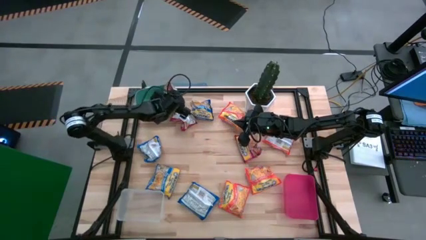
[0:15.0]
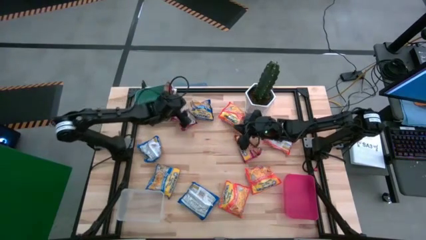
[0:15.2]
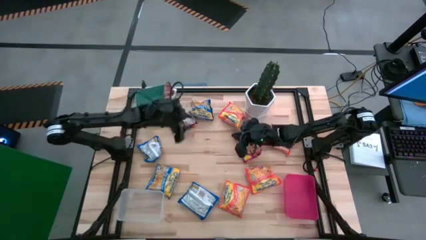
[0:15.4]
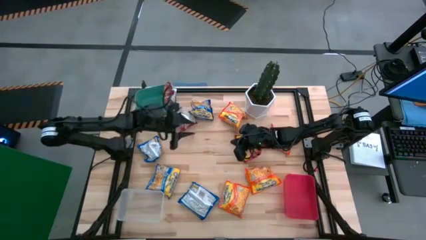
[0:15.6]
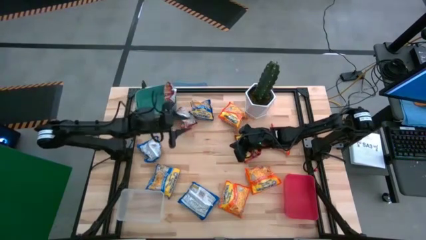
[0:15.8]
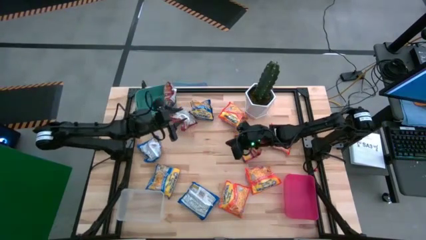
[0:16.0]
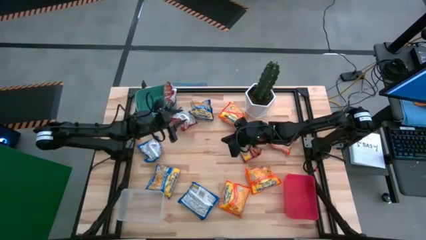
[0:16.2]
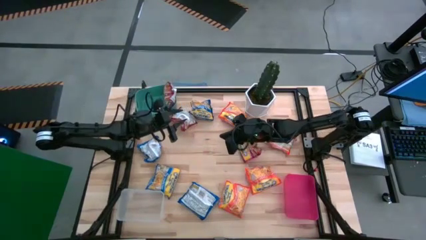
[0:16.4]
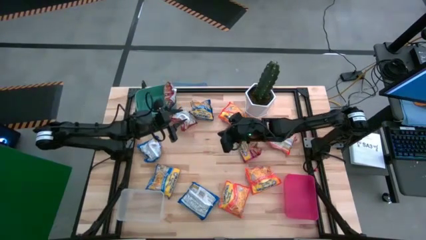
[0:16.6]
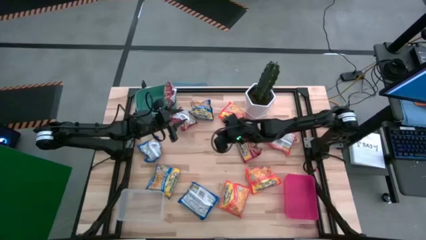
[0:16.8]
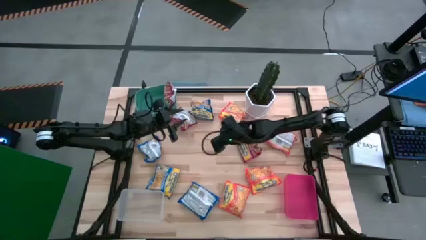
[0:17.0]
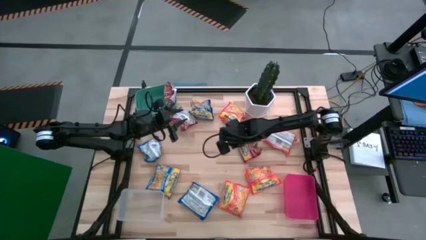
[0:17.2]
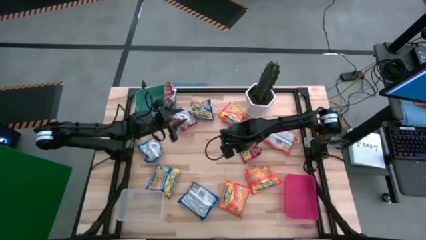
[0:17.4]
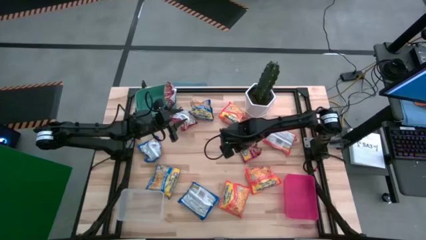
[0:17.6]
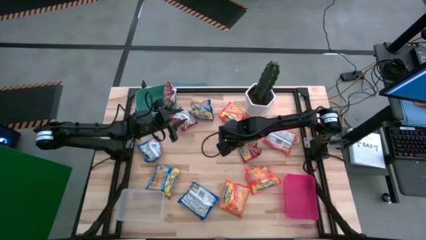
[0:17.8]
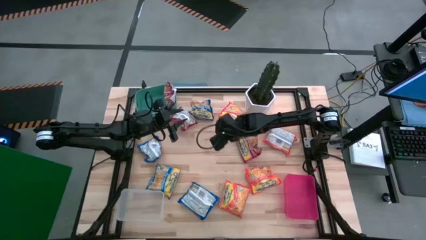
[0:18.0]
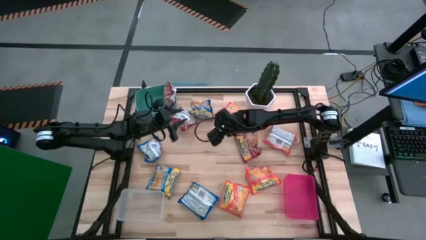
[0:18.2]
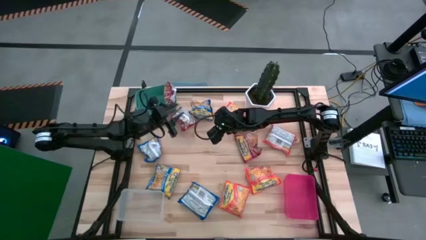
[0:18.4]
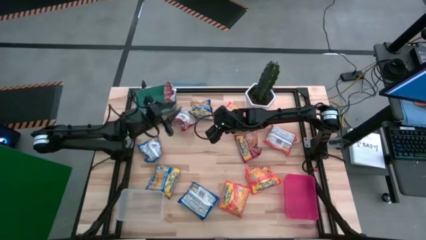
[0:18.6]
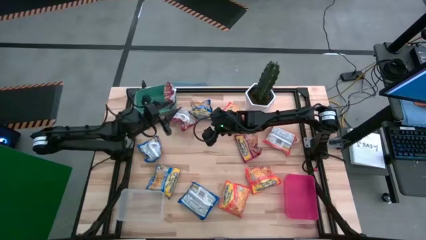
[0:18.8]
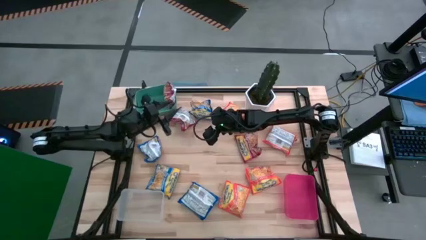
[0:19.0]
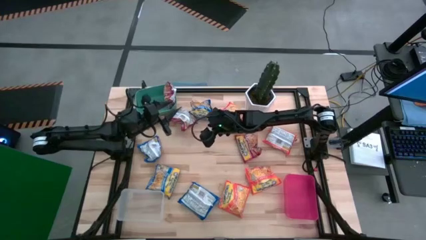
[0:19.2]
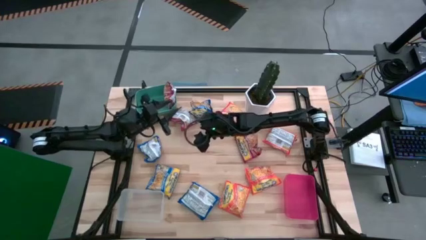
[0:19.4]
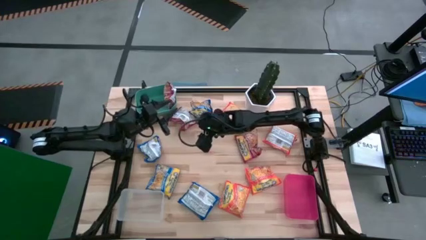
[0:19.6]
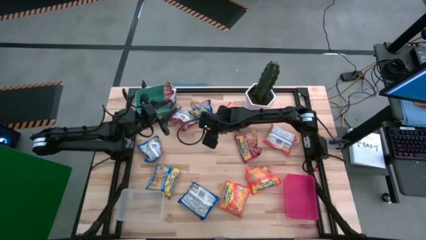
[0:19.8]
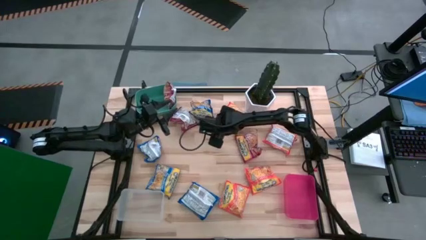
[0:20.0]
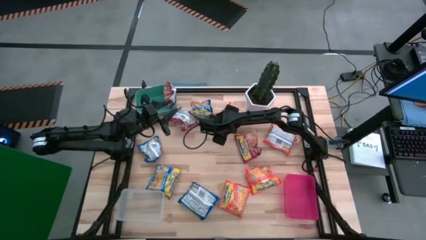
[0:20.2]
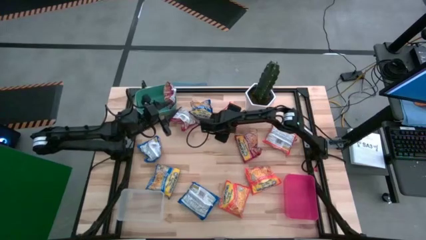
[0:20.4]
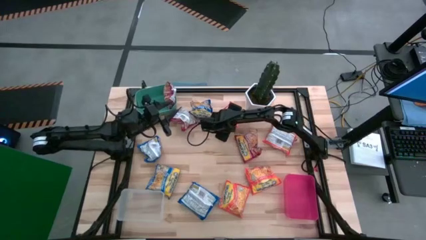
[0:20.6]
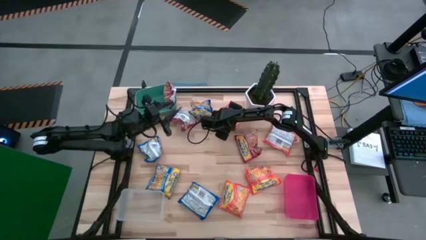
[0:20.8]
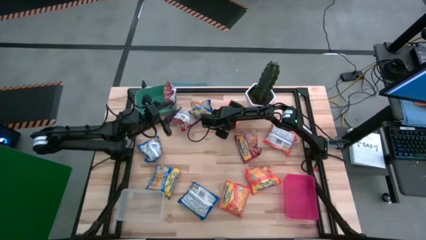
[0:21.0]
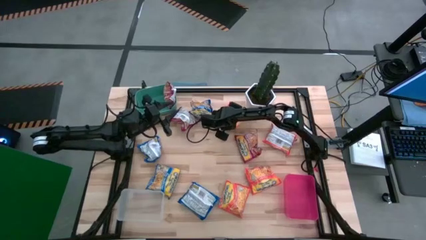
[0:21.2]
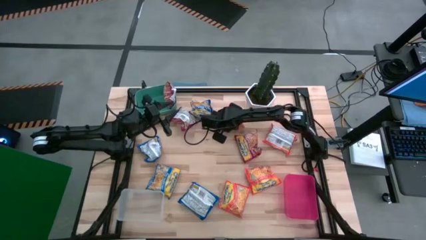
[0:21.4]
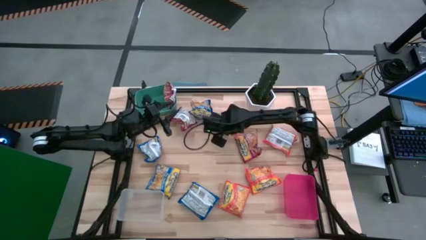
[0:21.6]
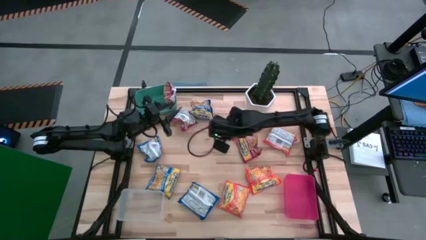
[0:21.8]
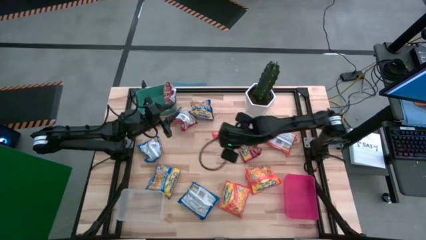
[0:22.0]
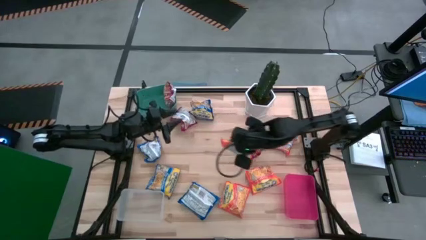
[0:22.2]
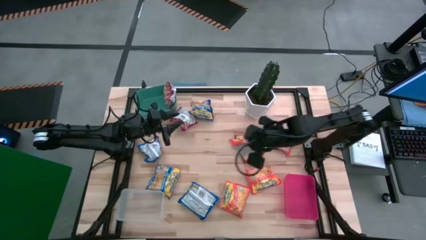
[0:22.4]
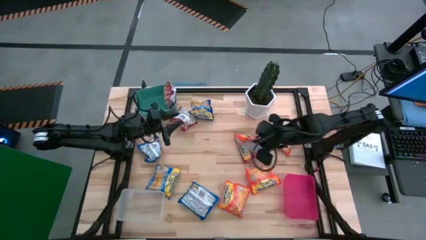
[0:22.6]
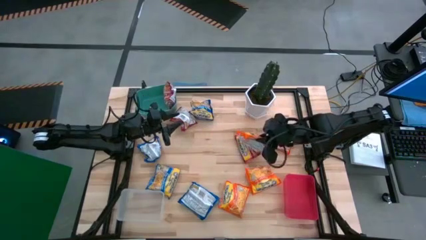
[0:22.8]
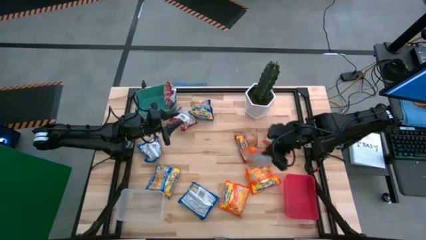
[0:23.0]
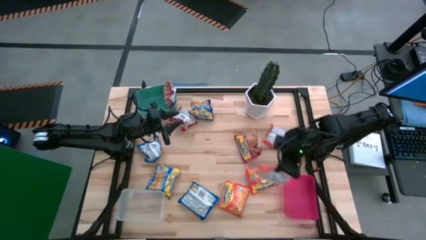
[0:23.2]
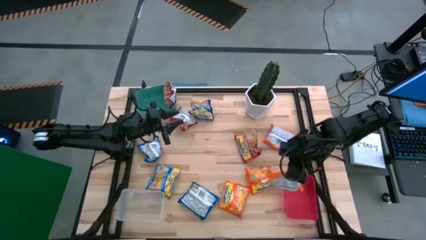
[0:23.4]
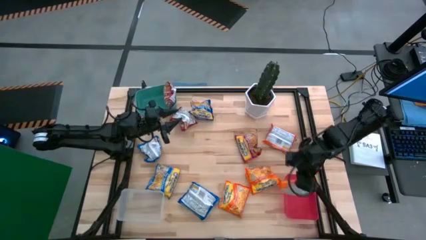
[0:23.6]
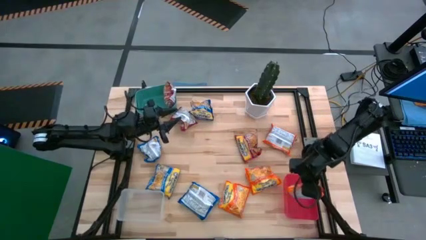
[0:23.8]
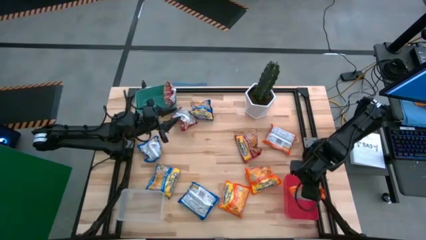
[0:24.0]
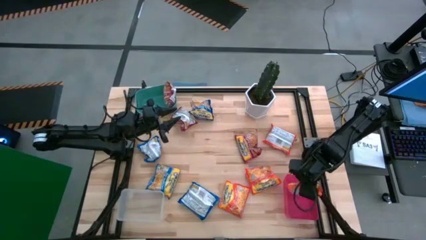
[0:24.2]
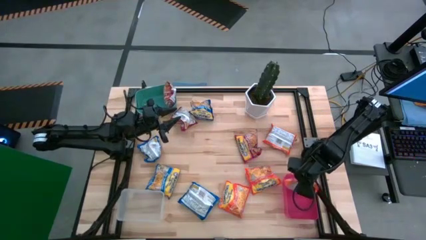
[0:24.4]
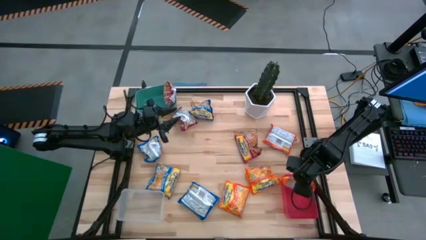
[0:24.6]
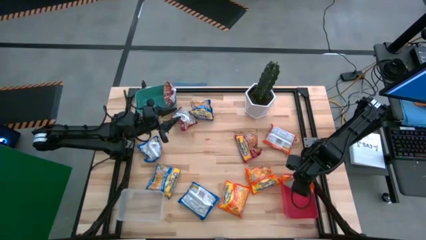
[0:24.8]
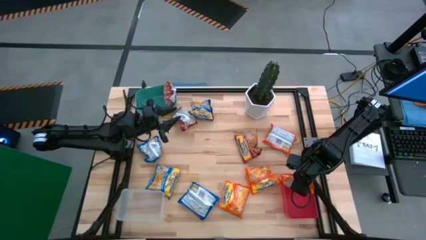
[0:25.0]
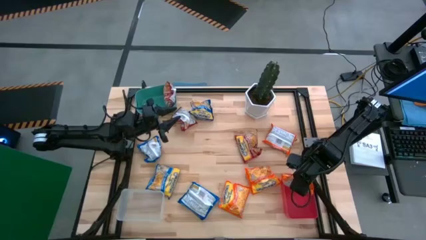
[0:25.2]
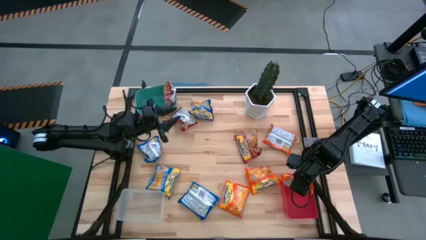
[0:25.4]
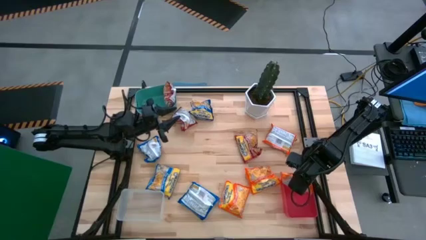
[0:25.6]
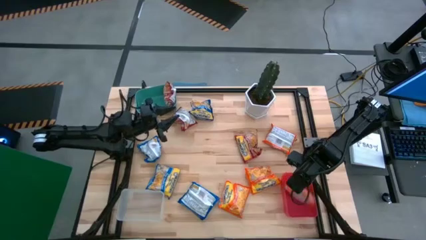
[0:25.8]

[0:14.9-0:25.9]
Task: Sort Maruchan noodles
Put the top orange noodle pack into the red bin

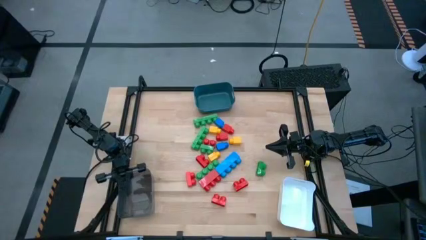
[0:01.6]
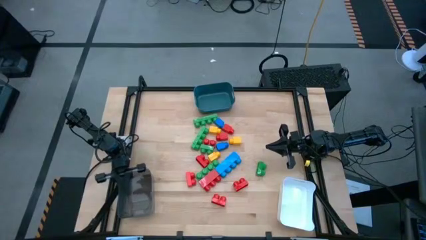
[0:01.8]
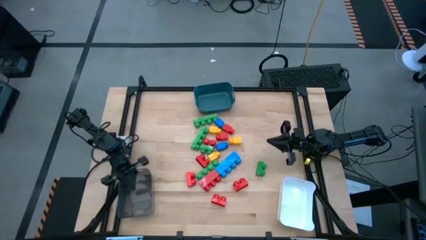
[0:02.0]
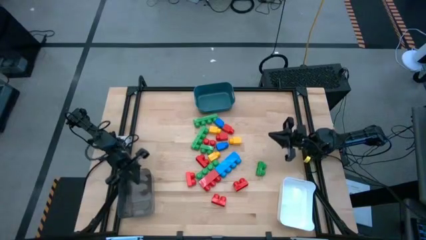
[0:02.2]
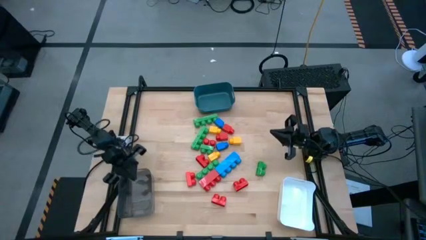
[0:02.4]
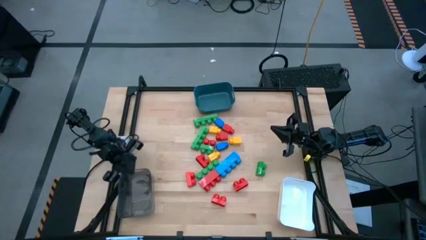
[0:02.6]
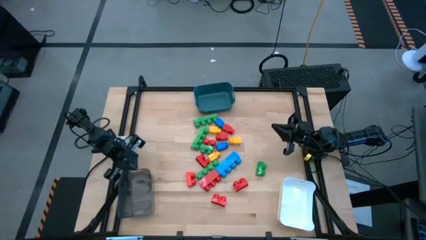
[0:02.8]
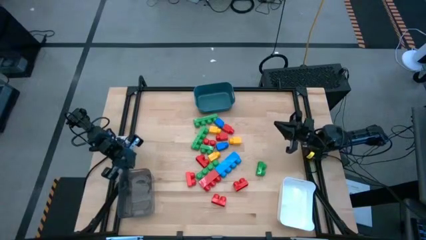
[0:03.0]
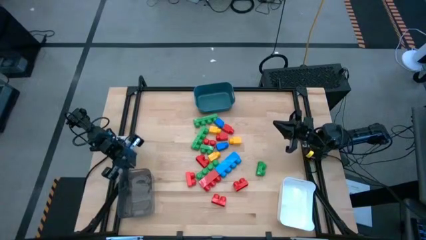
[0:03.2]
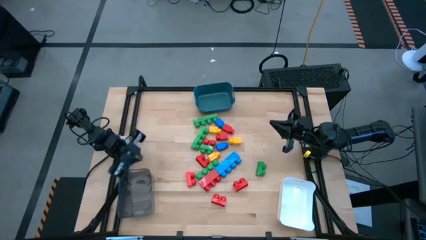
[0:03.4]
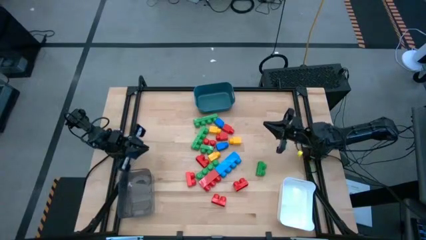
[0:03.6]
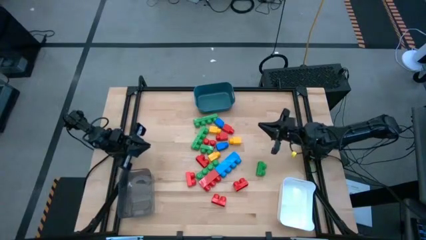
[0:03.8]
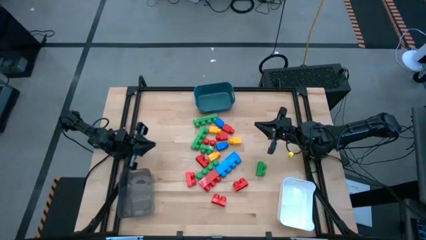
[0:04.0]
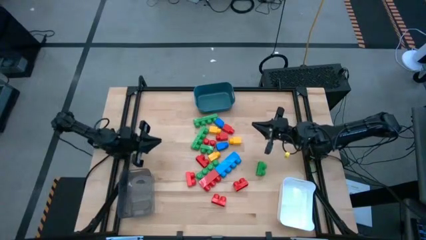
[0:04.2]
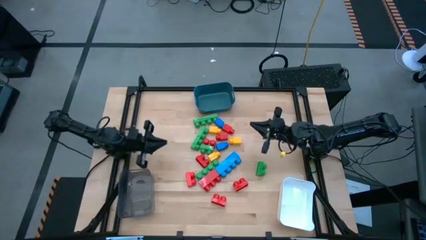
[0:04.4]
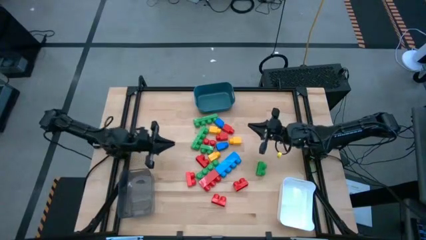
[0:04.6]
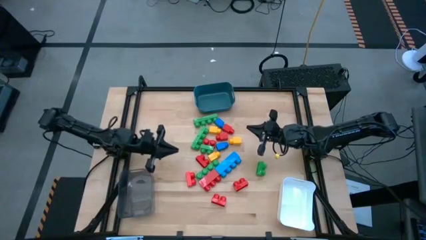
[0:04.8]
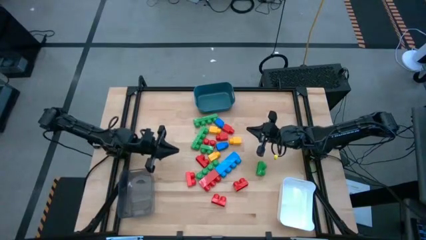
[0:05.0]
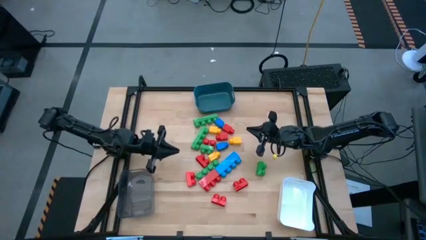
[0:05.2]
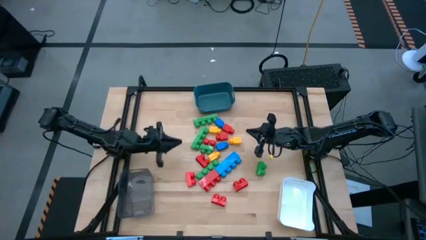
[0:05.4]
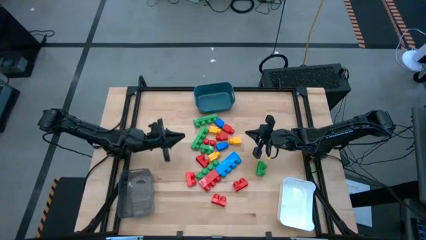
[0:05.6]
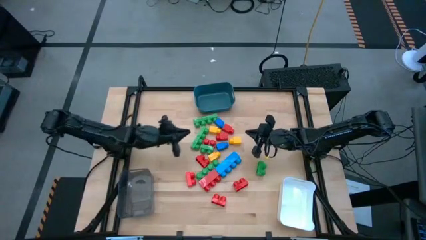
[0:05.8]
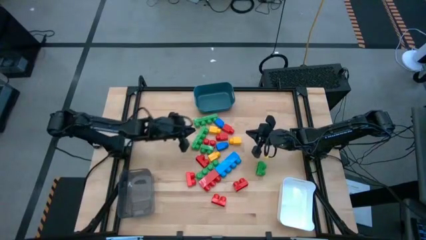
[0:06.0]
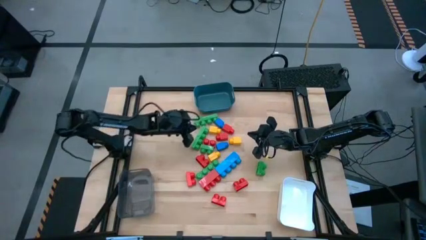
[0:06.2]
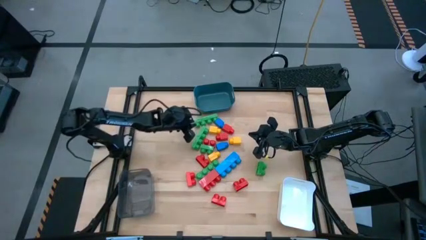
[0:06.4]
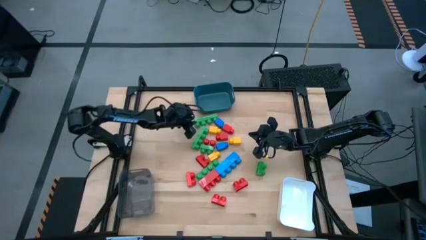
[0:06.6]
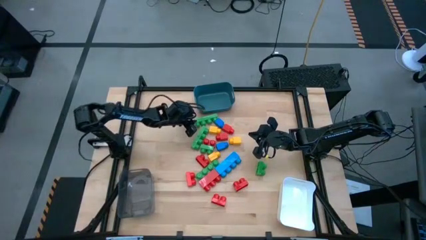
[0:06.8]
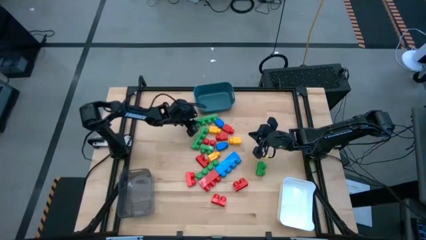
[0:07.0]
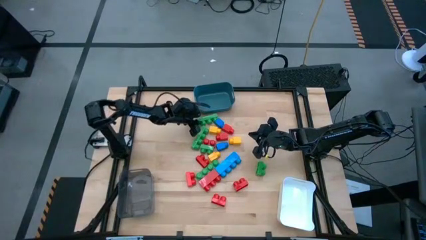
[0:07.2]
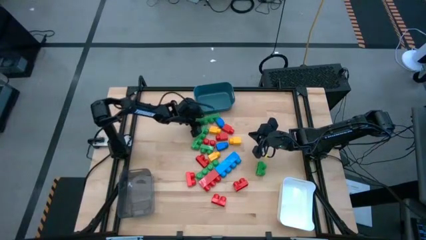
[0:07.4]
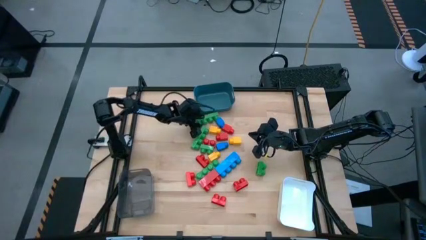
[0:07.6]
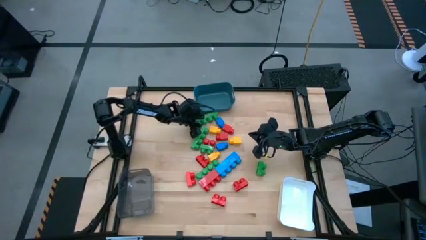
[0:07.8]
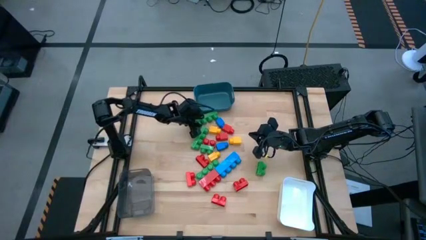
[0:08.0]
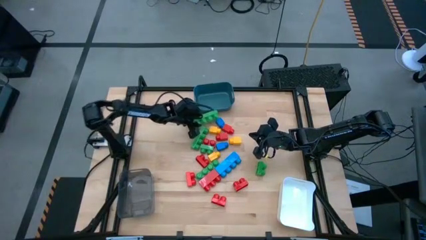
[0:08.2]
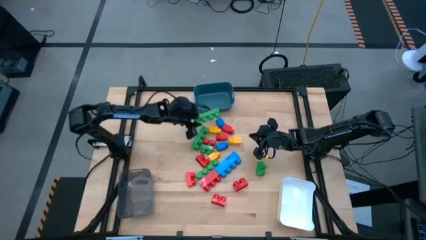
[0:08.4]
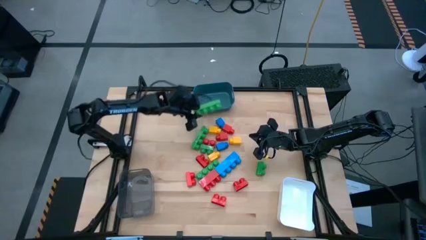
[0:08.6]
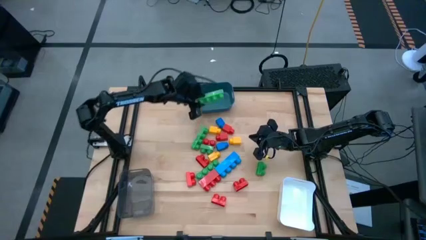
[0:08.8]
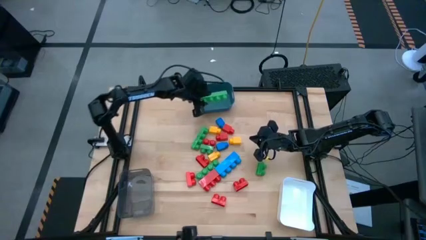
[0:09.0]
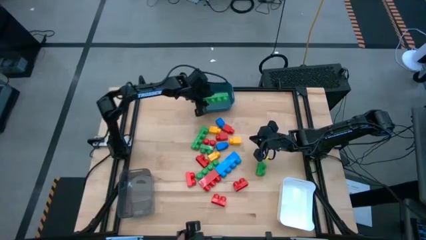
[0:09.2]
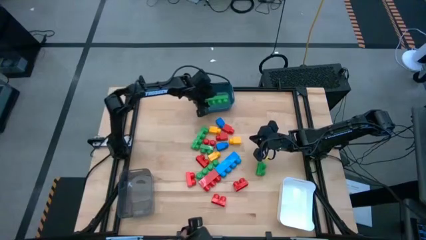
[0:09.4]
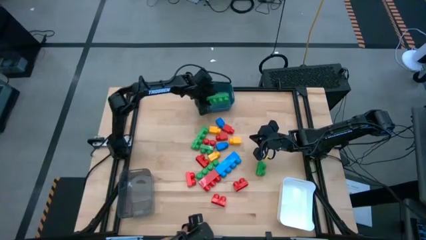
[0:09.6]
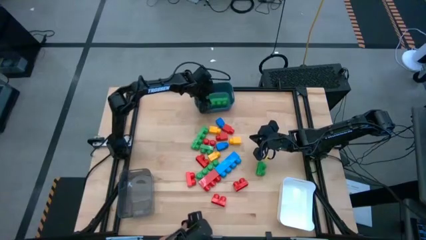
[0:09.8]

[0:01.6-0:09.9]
Task: Sort blocks by size
Put the green game piece into the blue container
